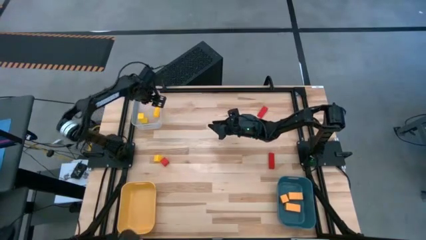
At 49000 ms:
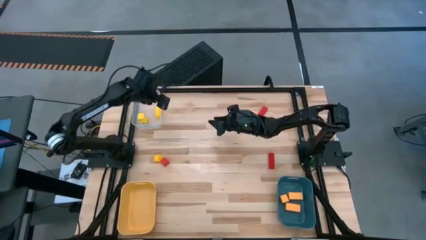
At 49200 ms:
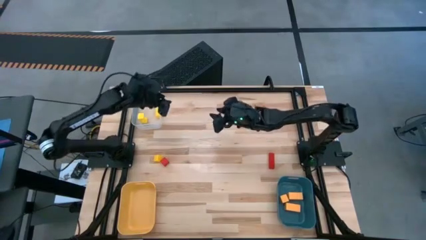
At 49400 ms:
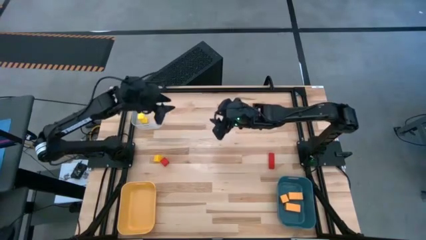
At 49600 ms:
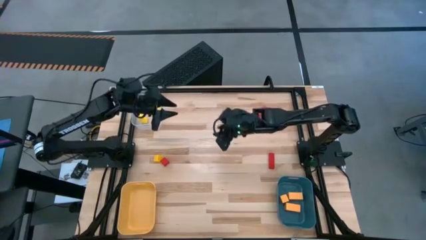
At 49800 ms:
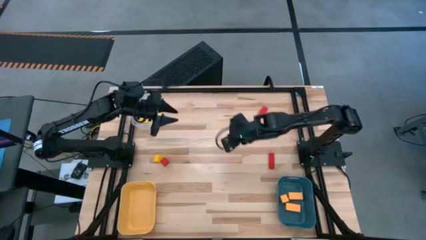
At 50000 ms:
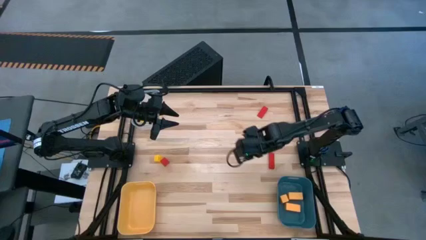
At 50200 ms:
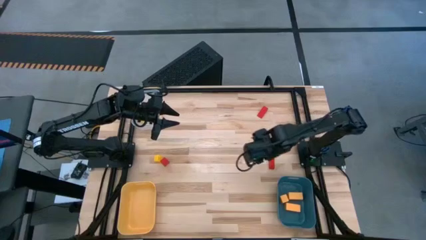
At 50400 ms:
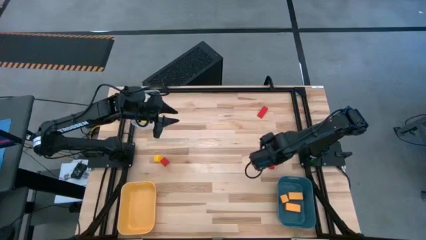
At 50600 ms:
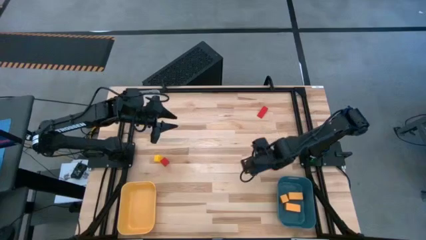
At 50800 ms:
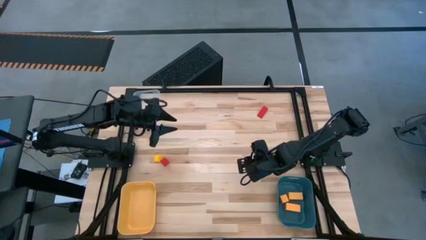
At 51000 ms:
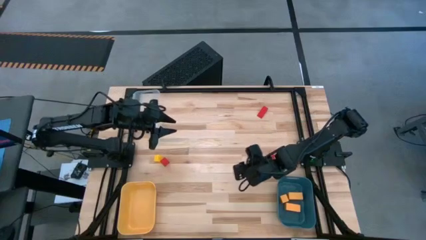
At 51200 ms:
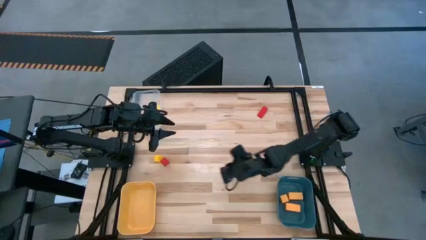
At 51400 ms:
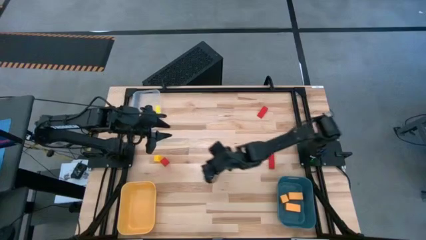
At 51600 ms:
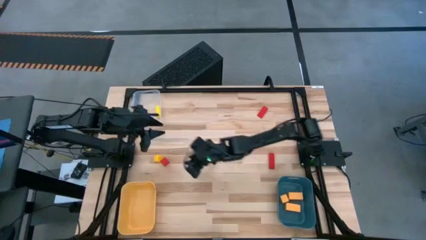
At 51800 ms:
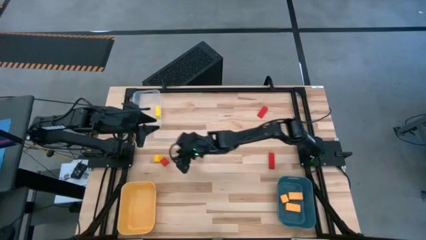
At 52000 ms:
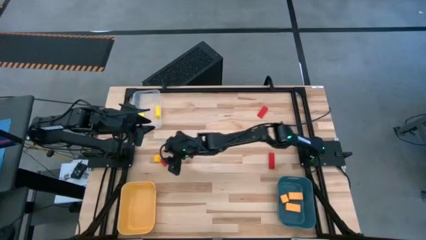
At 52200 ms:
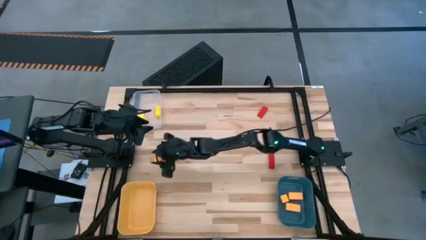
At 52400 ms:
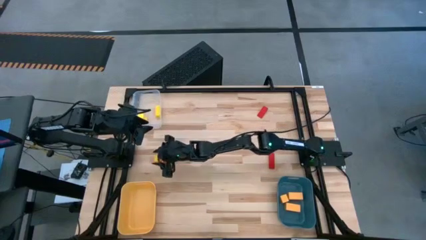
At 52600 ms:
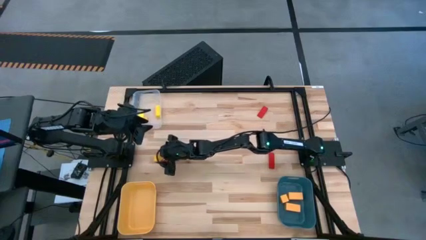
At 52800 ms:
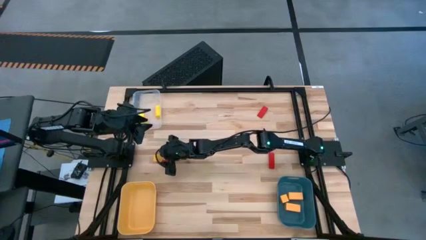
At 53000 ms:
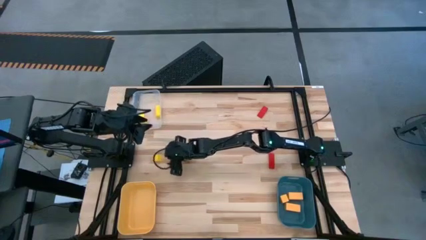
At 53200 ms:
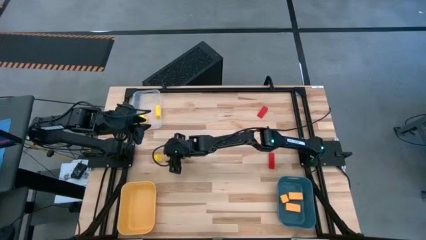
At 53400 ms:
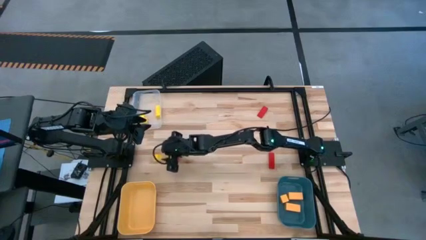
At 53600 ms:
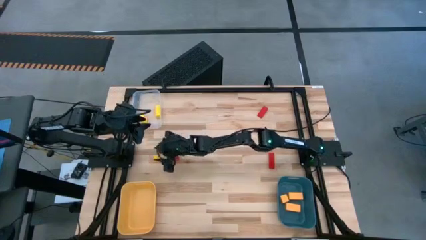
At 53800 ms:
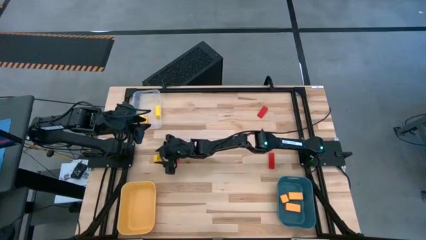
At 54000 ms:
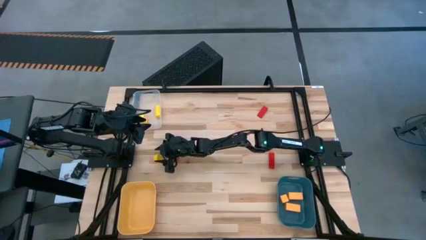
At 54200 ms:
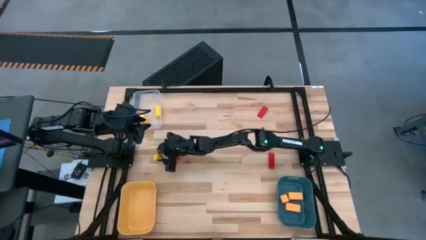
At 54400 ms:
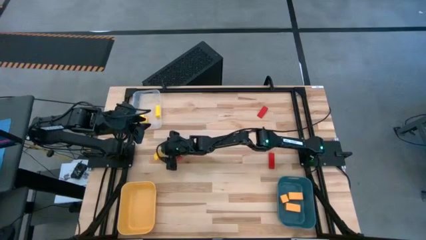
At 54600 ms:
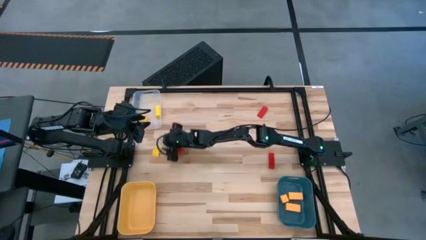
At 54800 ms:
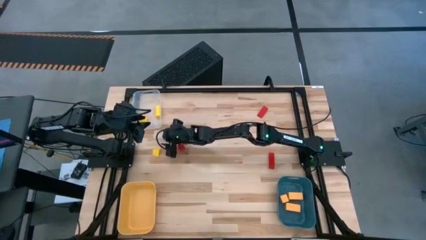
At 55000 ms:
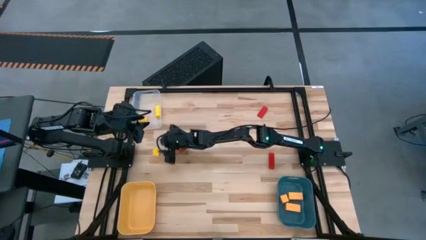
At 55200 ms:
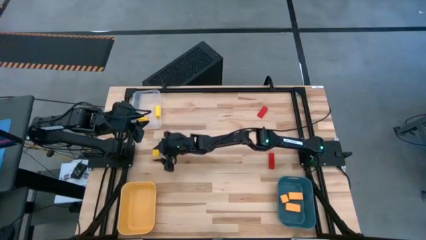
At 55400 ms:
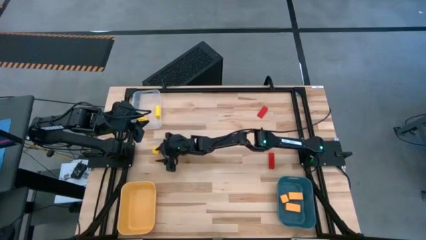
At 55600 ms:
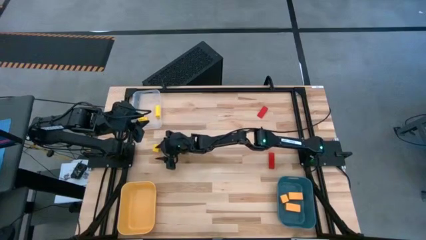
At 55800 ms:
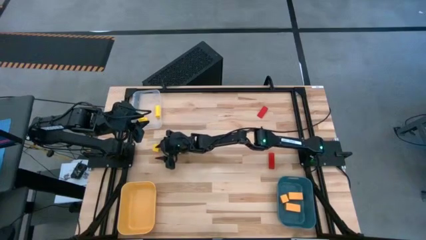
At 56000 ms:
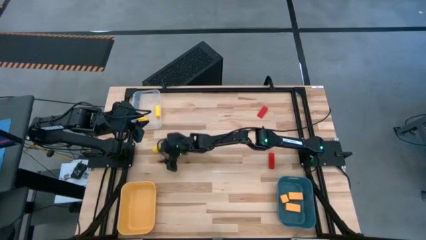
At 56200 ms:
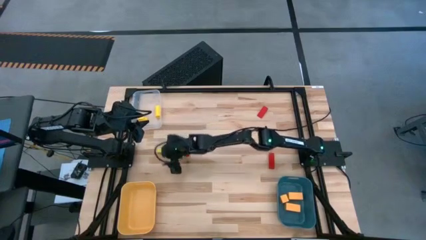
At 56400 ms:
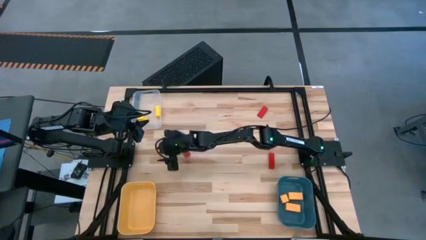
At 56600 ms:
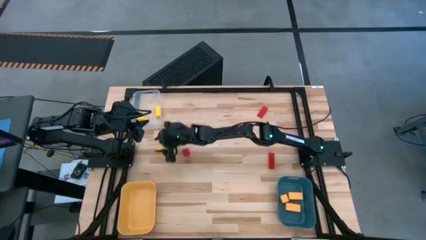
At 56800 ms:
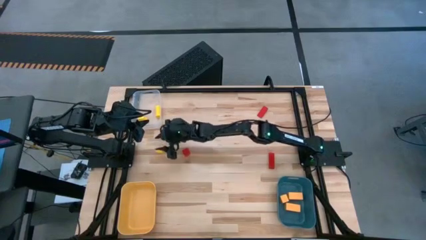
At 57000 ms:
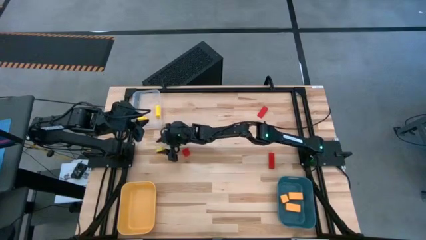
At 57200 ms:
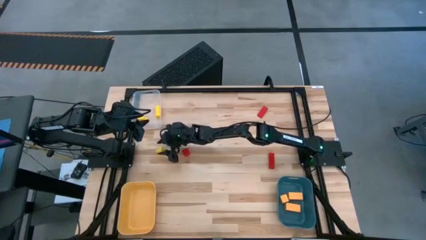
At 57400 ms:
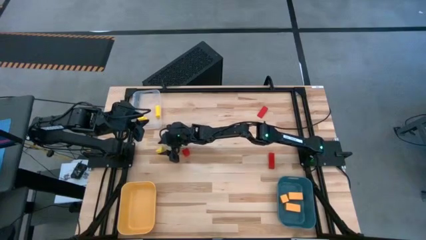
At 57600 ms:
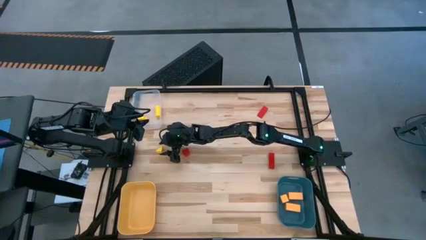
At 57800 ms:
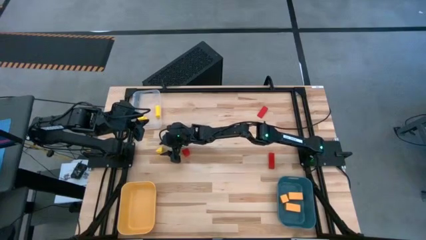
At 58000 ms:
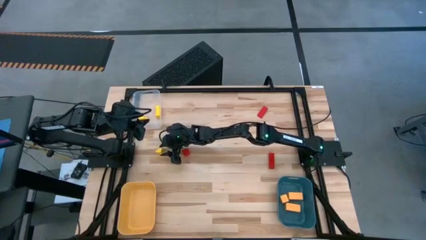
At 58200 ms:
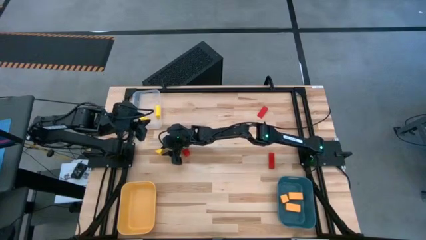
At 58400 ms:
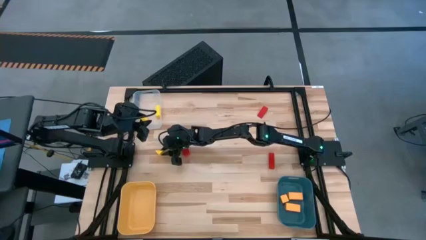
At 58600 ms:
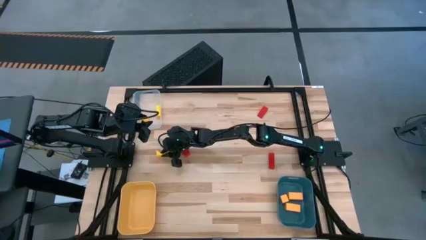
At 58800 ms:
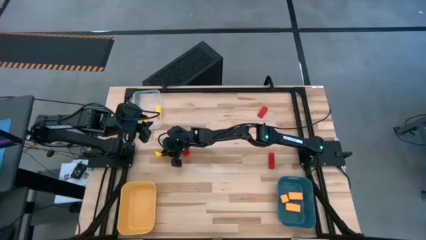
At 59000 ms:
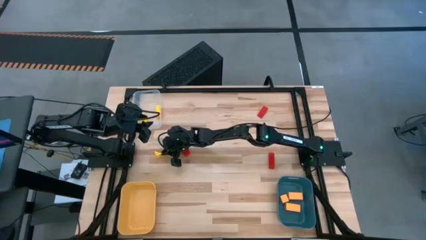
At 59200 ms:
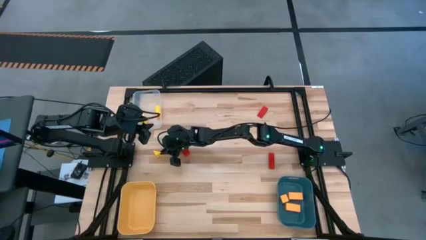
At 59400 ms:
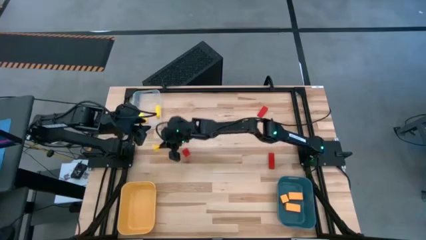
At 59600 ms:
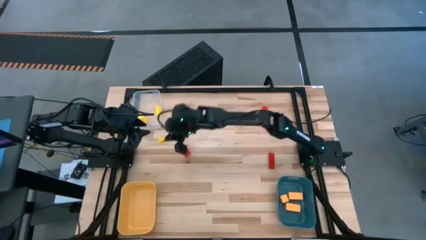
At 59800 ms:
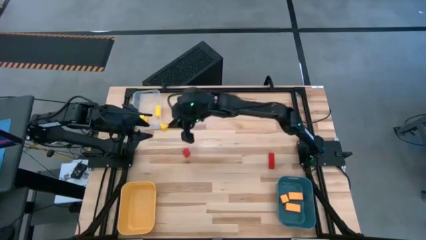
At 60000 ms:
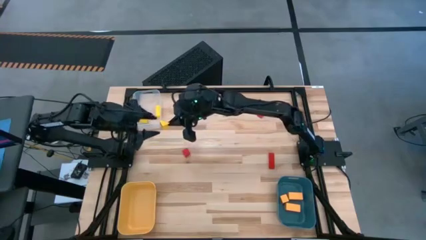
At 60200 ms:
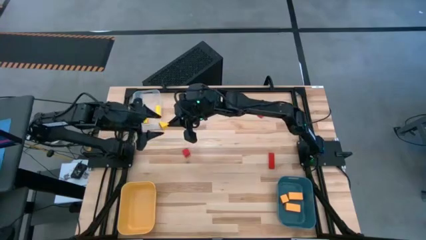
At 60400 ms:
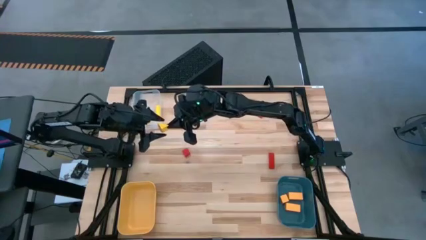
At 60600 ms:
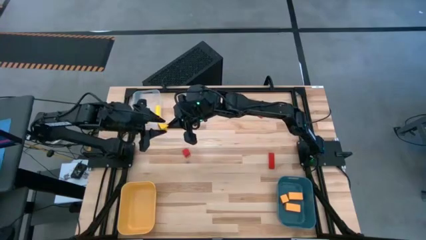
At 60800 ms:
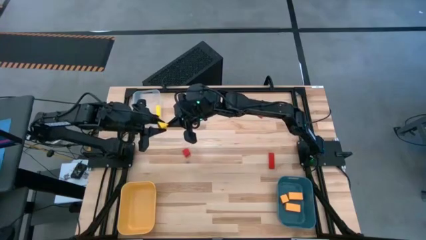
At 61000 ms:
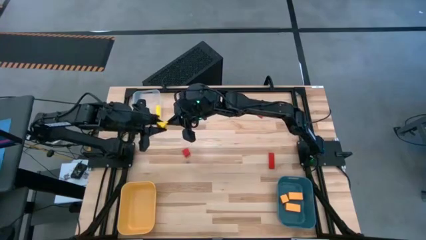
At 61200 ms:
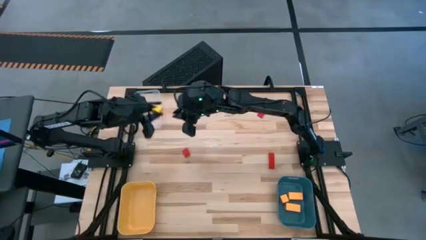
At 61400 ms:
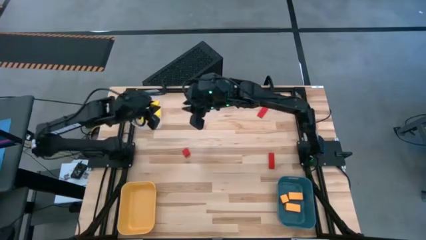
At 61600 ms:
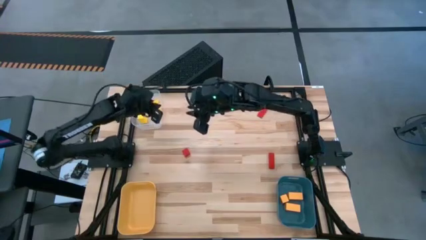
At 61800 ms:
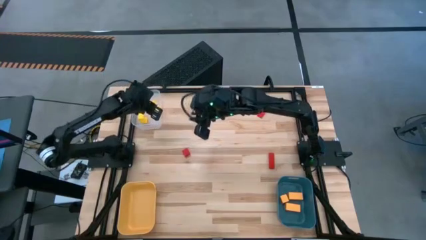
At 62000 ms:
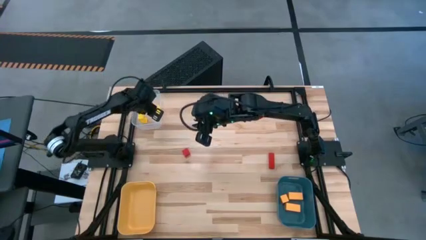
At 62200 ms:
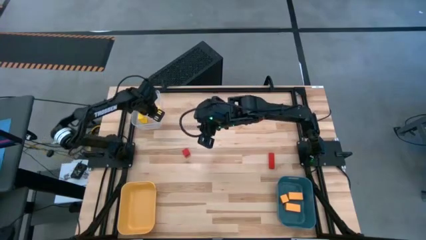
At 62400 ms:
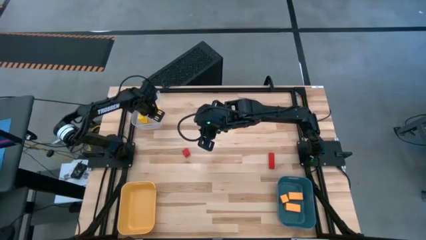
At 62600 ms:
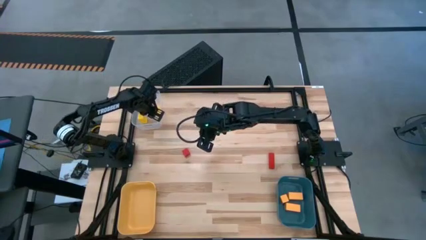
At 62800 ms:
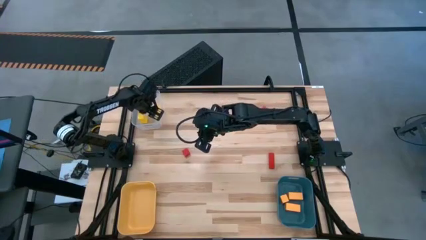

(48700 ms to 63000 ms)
Task: Sort & place blocks by color
Put the yellow block into the transparent white bin
